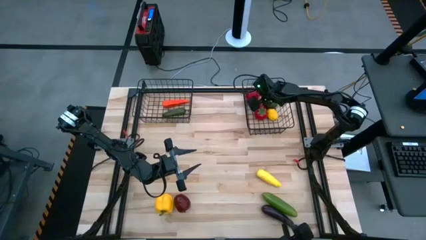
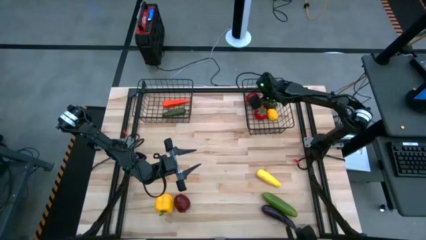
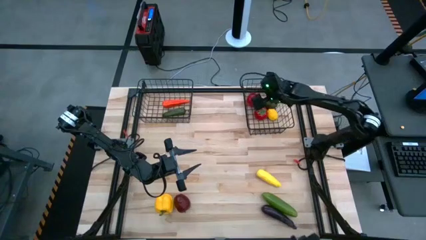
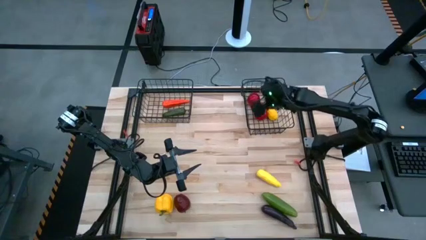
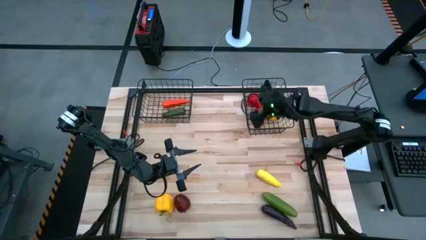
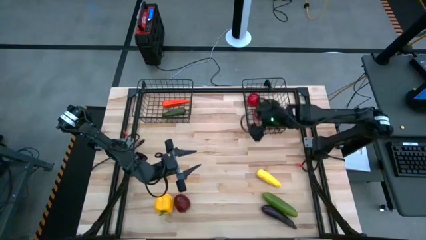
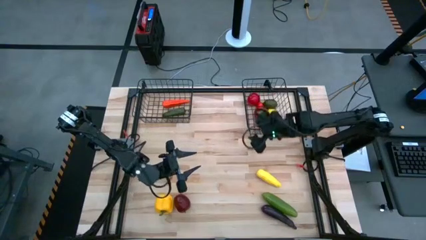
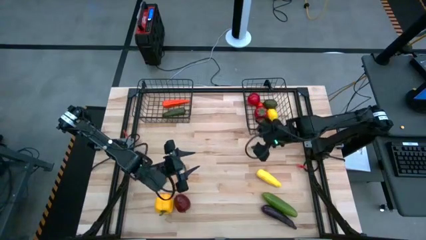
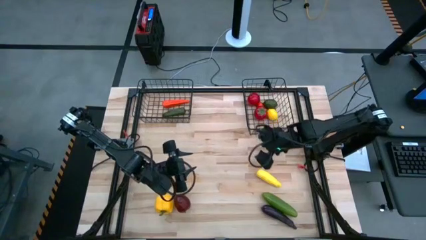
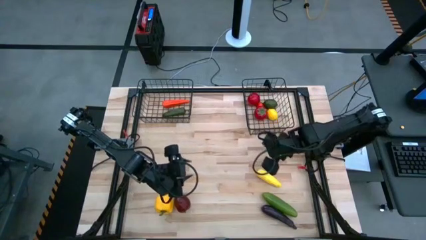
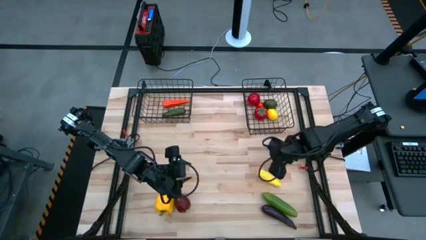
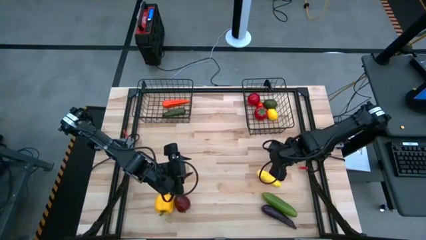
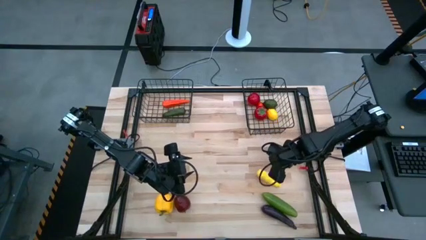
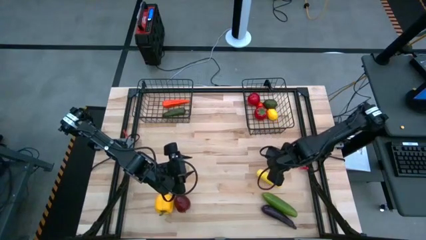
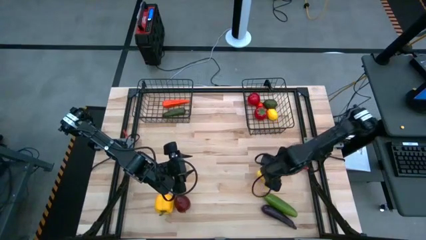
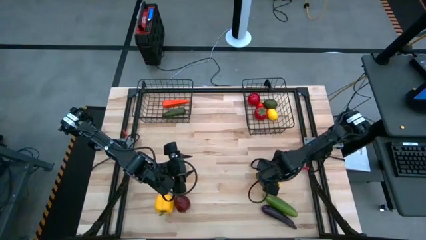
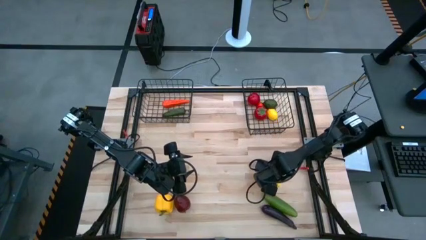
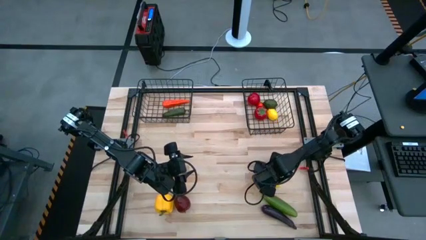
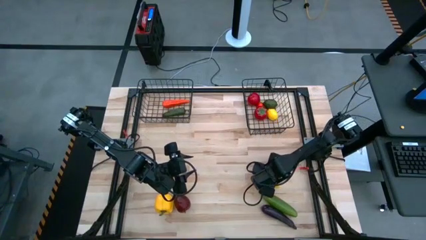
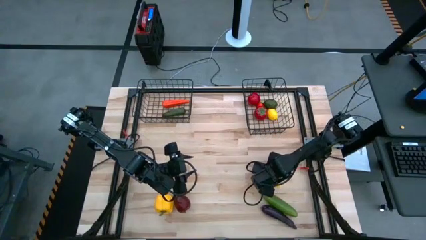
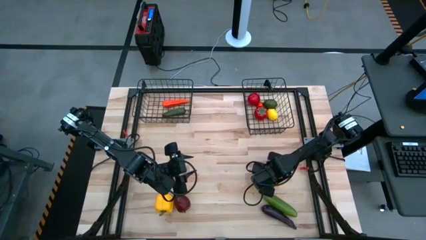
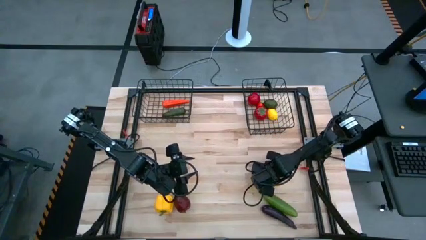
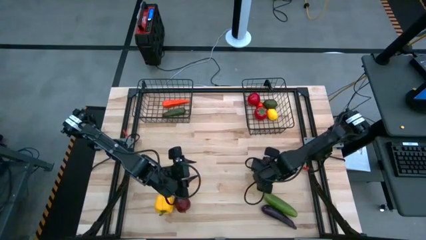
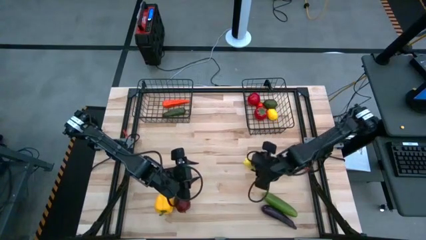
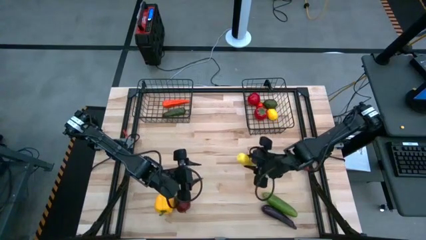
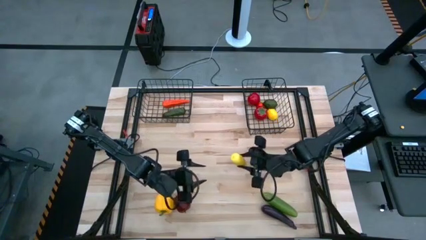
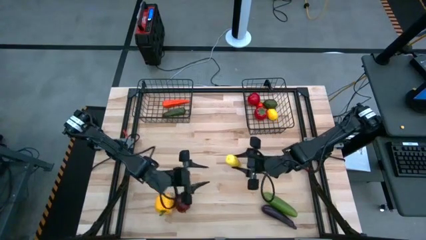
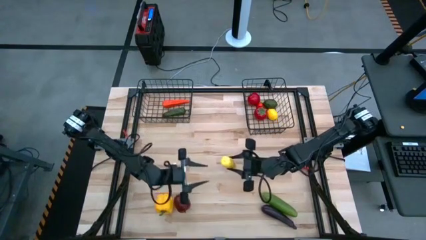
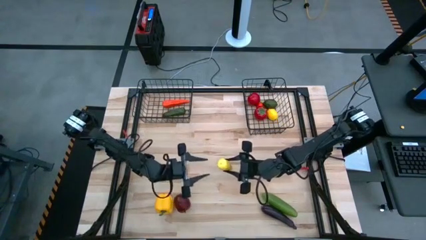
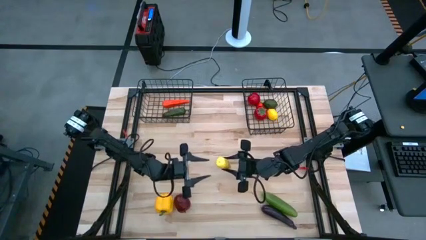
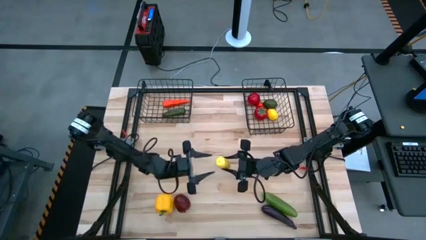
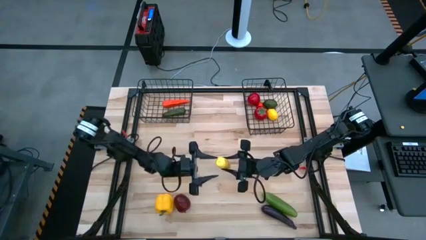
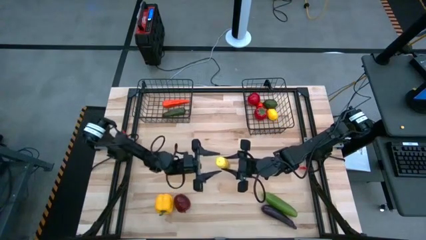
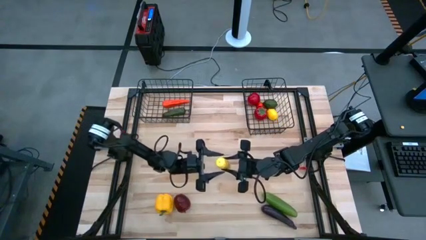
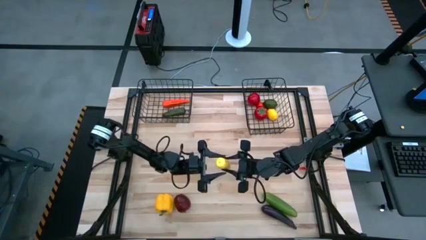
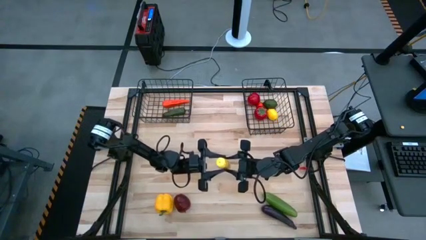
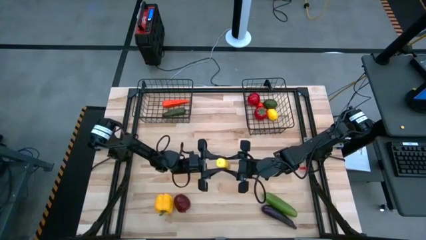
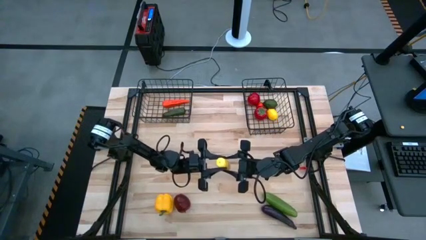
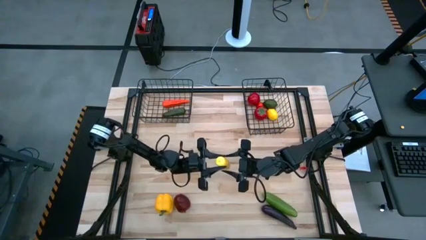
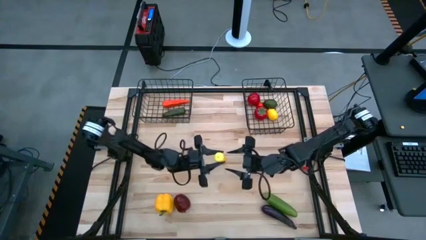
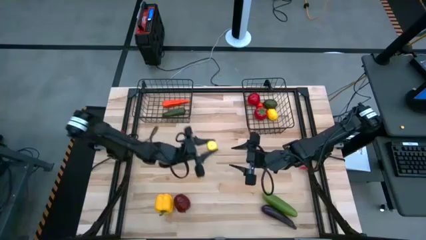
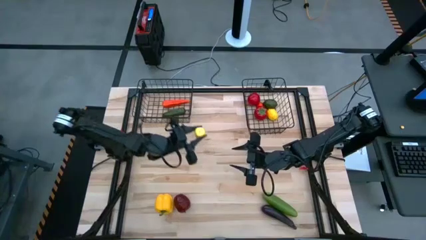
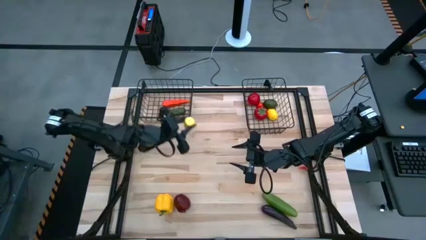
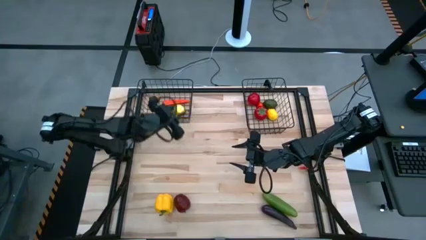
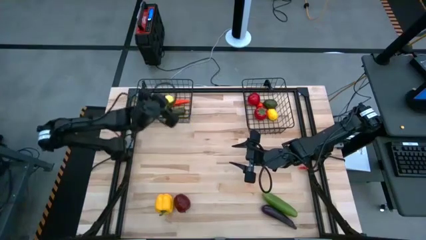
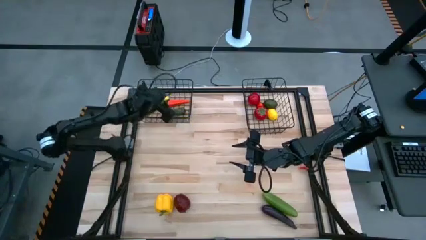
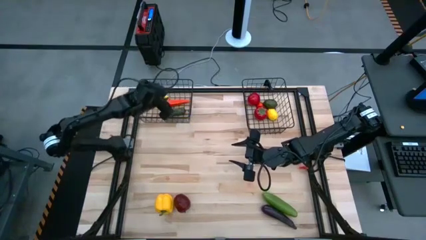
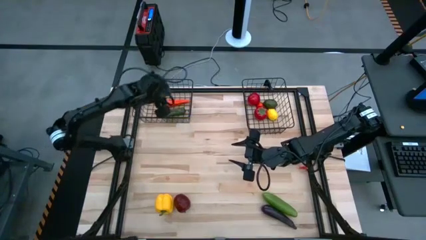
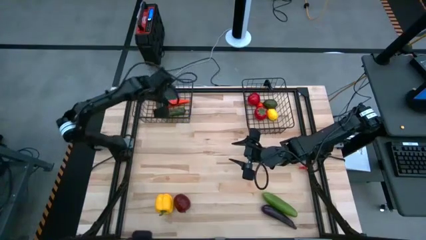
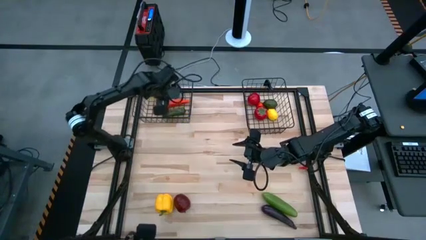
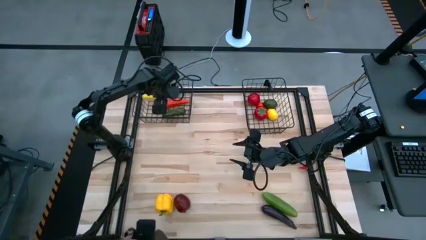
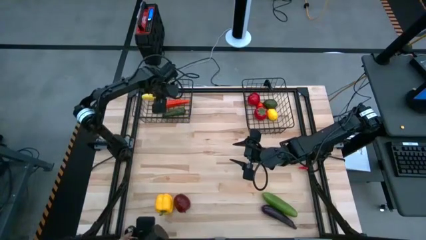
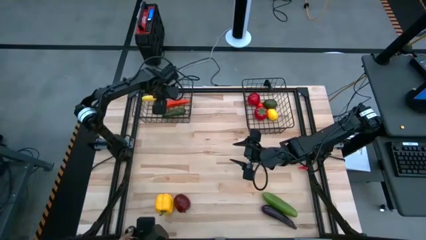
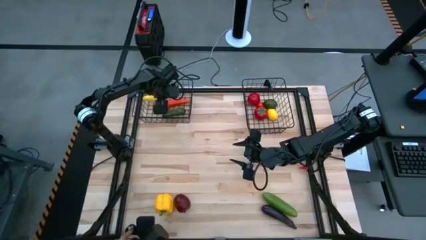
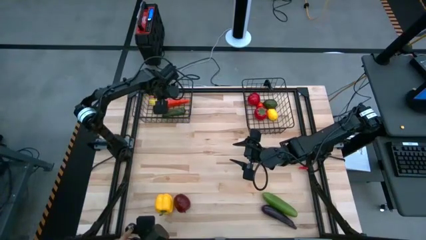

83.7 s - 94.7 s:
Task: Sort produce into baskets
Put the yellow corn into the left black wire basket

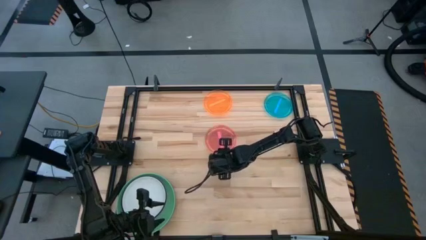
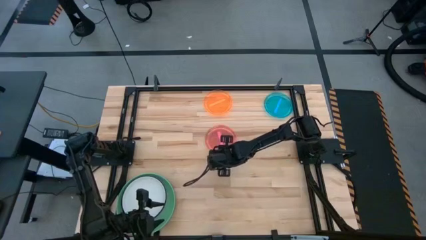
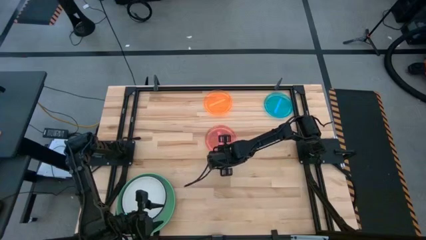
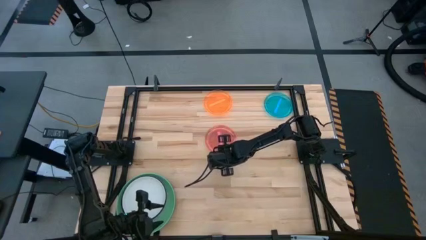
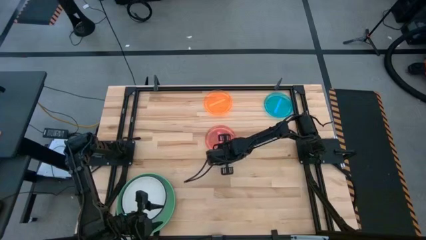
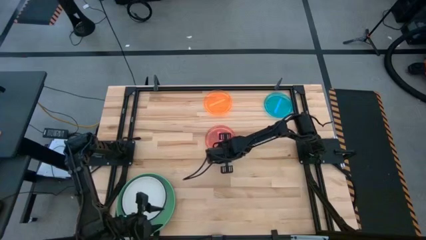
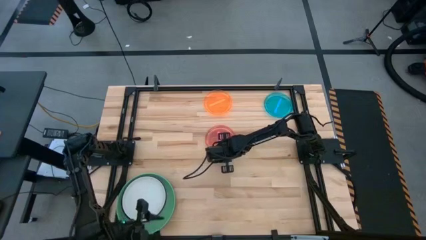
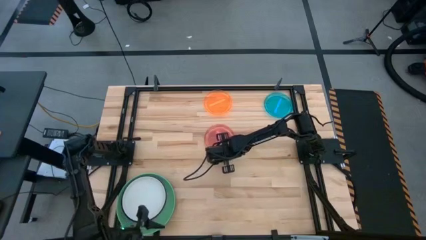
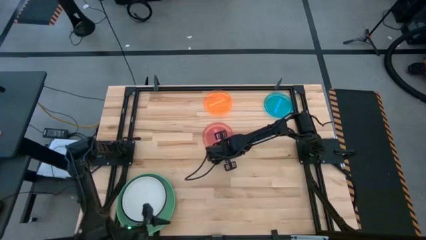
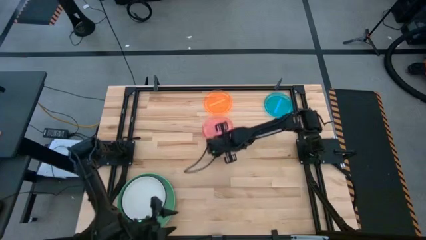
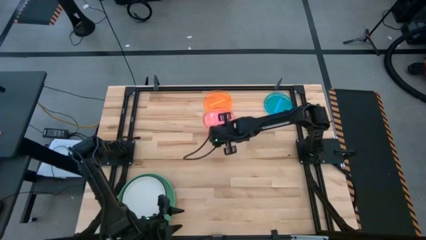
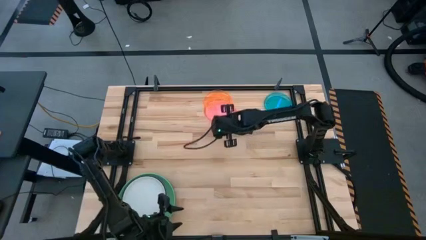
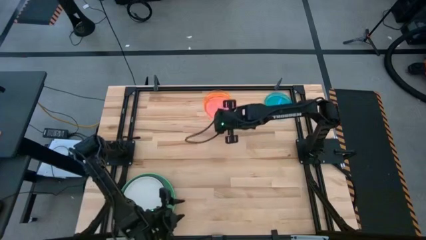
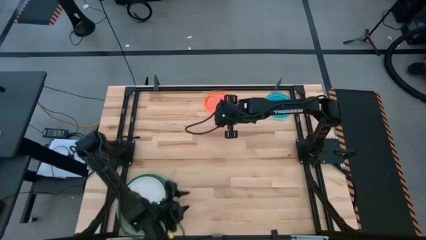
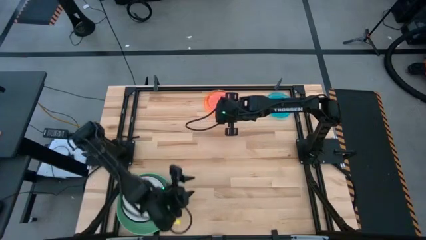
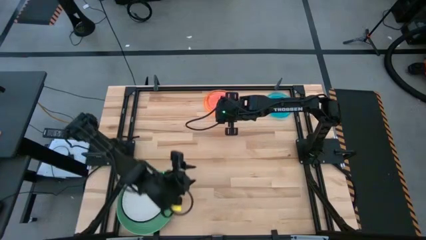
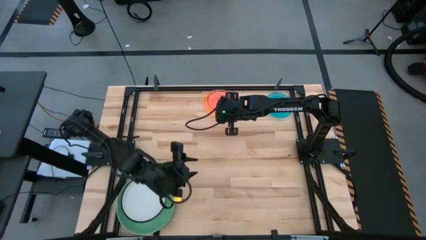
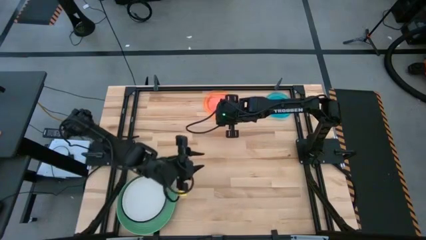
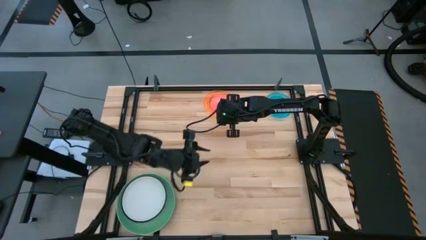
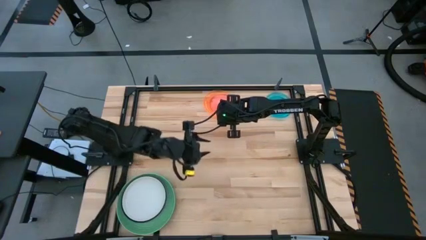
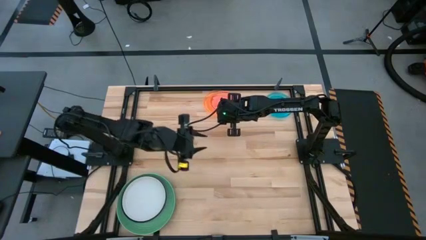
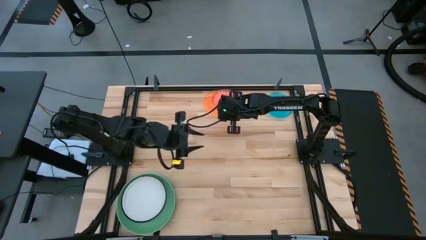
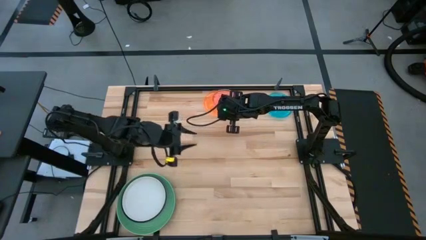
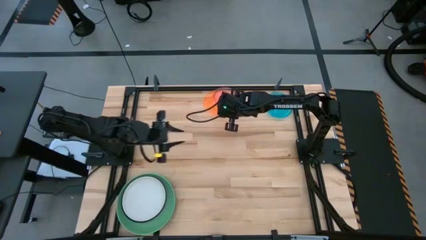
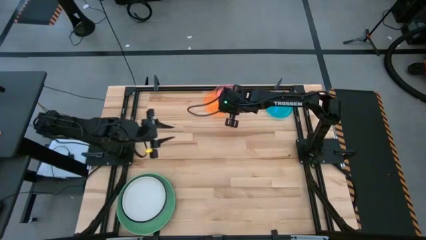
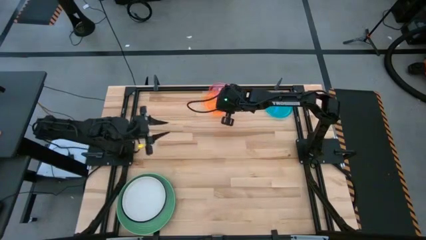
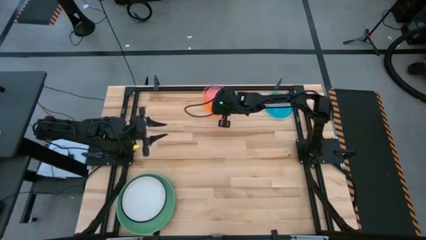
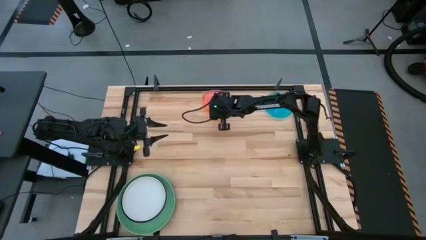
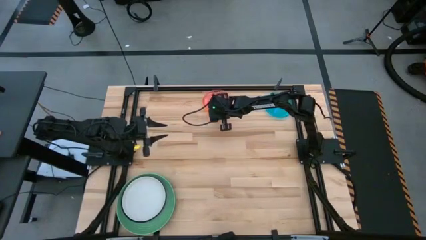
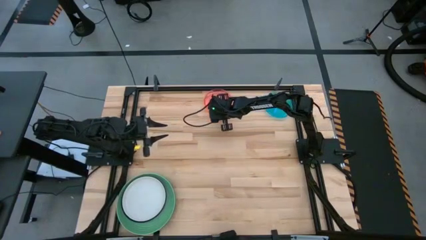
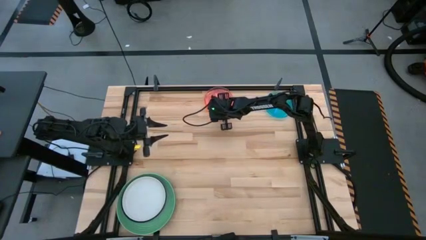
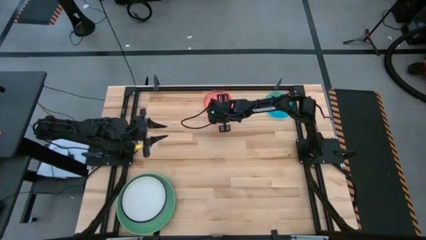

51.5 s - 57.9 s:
Task: Stack plastic plates
Stack the top stacked plates on top of the orange plate
